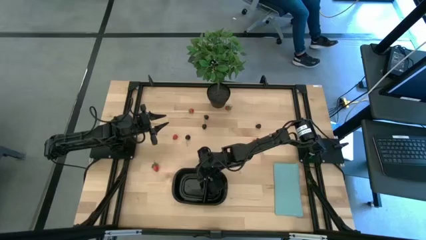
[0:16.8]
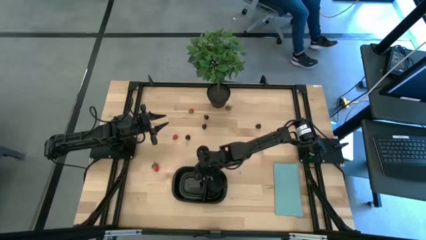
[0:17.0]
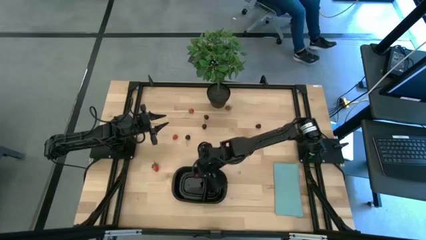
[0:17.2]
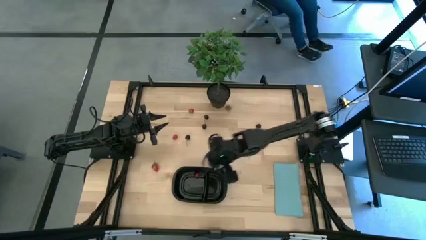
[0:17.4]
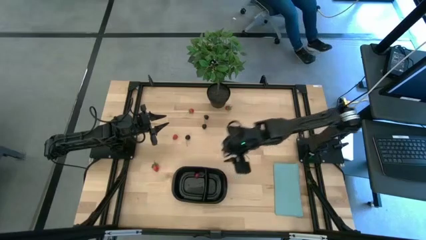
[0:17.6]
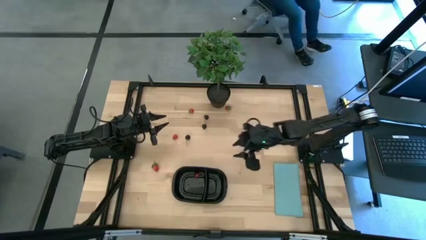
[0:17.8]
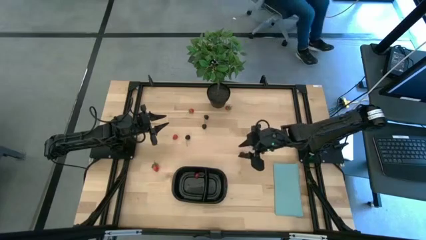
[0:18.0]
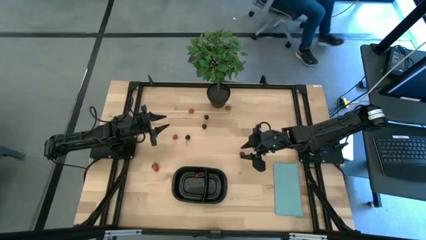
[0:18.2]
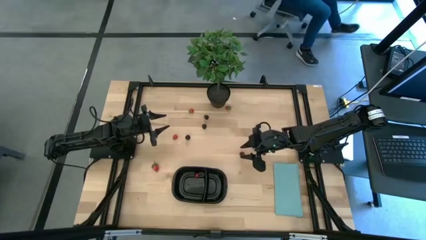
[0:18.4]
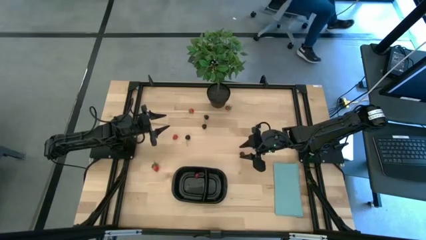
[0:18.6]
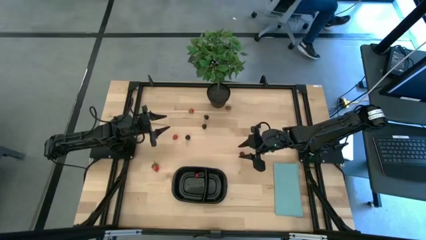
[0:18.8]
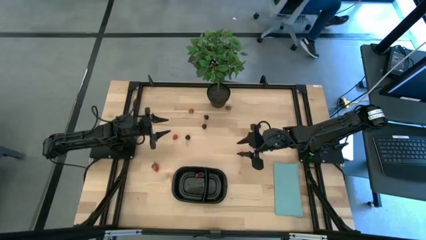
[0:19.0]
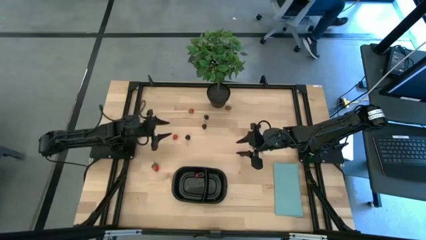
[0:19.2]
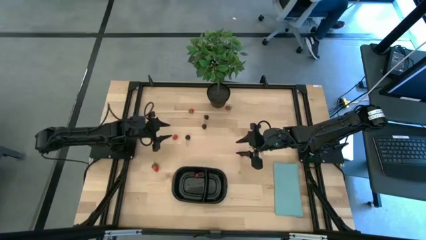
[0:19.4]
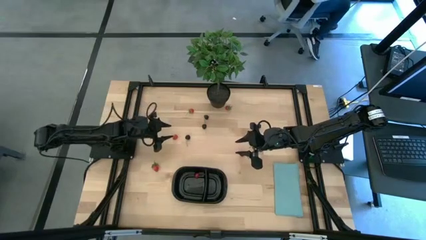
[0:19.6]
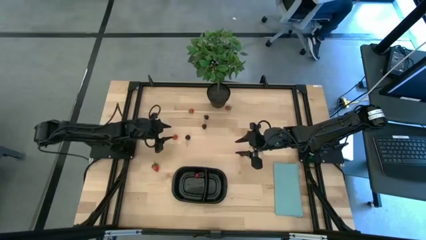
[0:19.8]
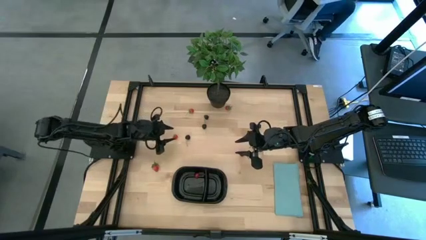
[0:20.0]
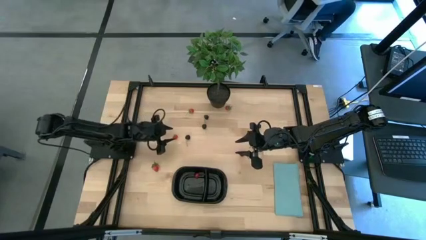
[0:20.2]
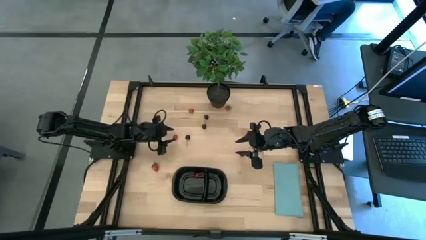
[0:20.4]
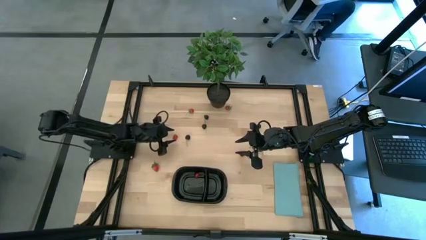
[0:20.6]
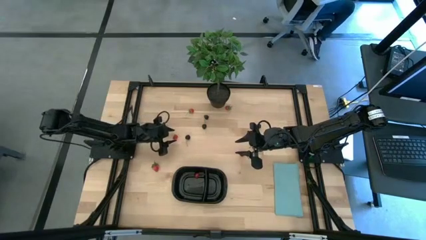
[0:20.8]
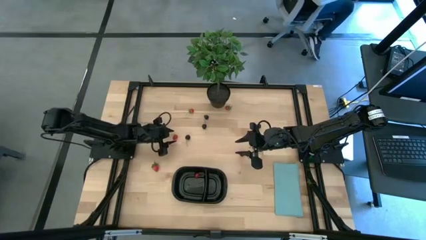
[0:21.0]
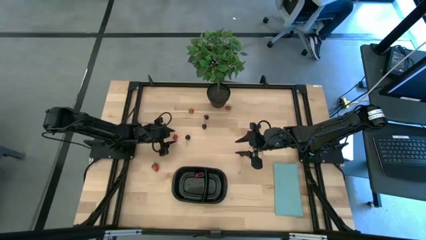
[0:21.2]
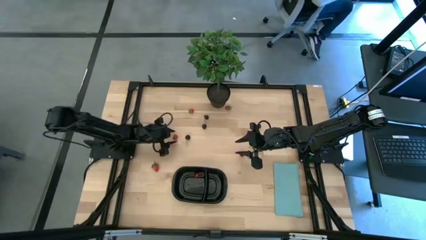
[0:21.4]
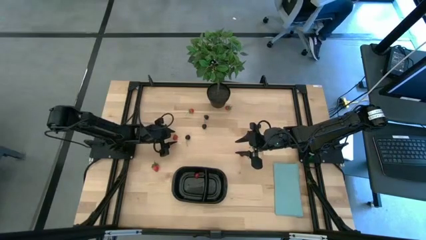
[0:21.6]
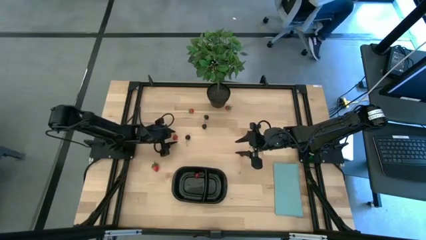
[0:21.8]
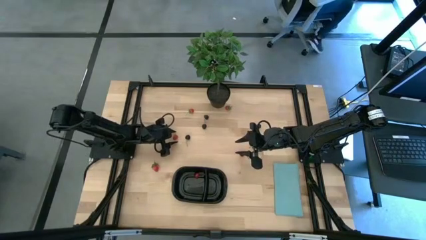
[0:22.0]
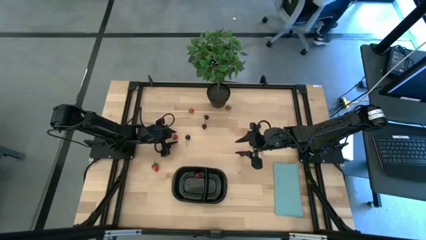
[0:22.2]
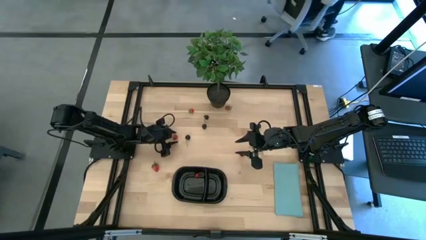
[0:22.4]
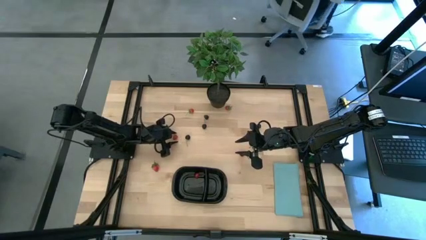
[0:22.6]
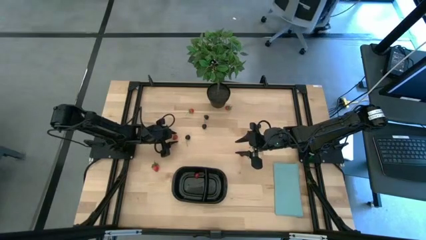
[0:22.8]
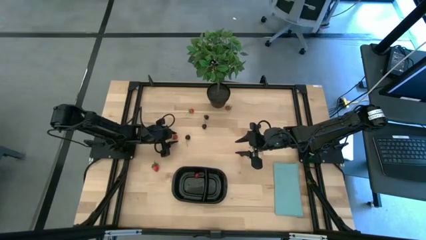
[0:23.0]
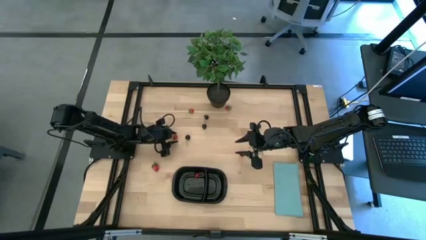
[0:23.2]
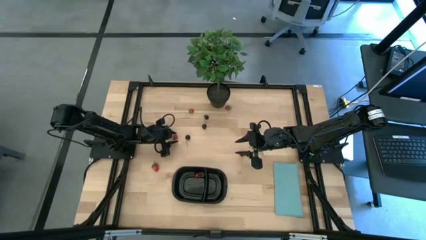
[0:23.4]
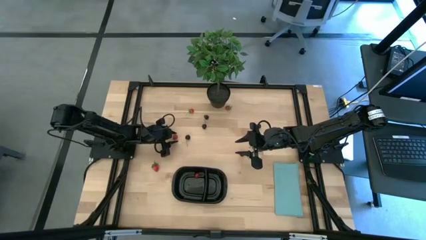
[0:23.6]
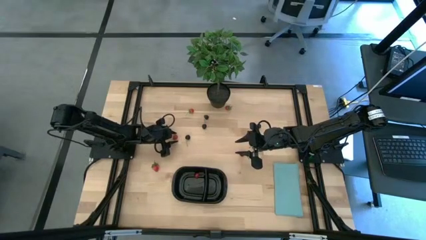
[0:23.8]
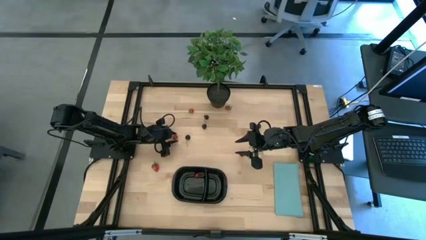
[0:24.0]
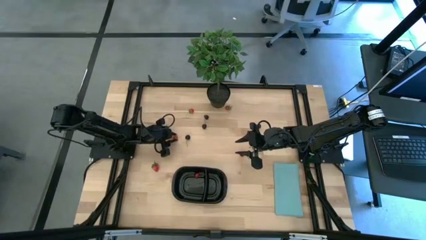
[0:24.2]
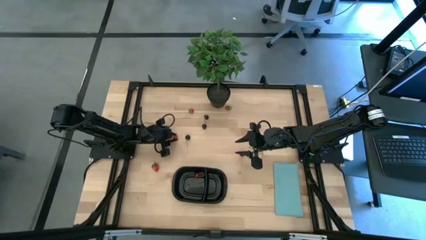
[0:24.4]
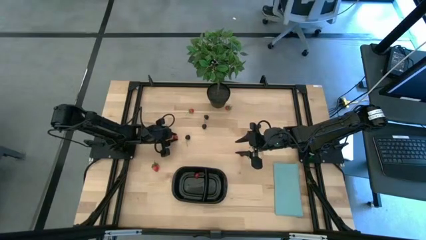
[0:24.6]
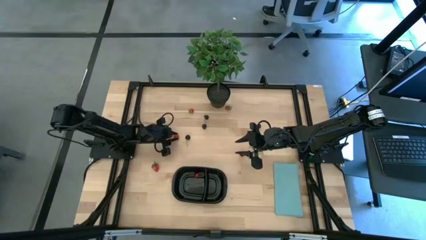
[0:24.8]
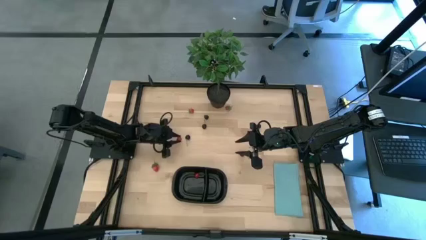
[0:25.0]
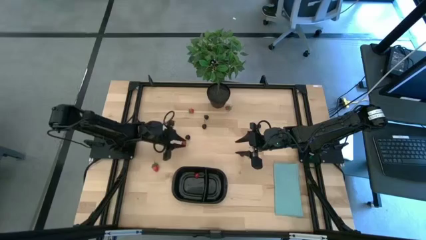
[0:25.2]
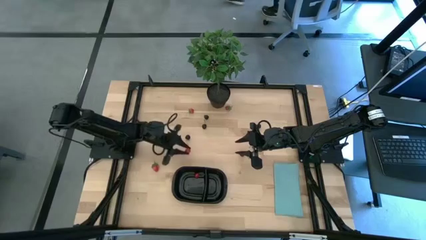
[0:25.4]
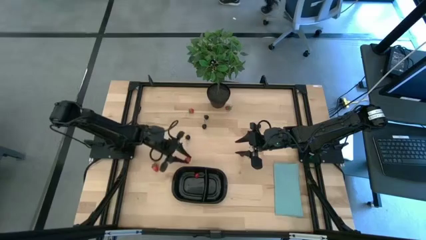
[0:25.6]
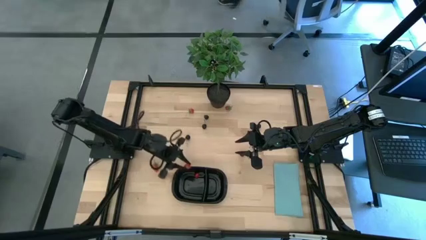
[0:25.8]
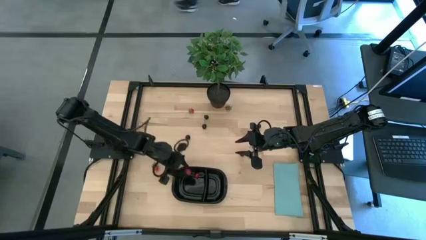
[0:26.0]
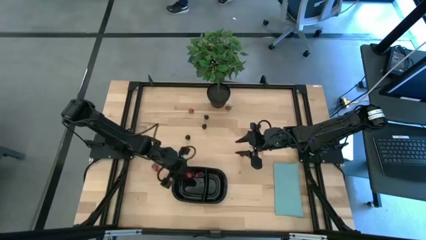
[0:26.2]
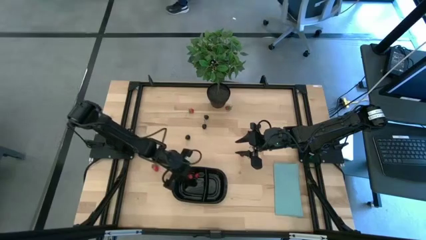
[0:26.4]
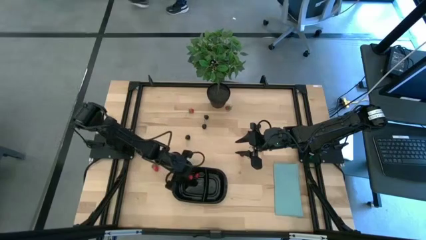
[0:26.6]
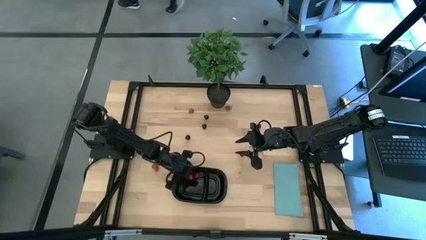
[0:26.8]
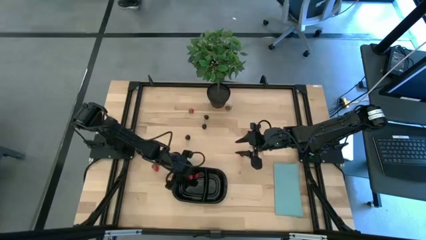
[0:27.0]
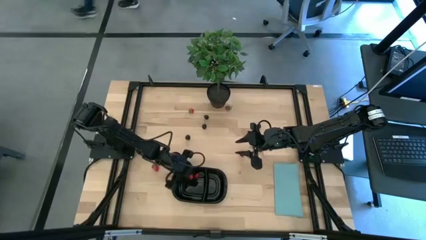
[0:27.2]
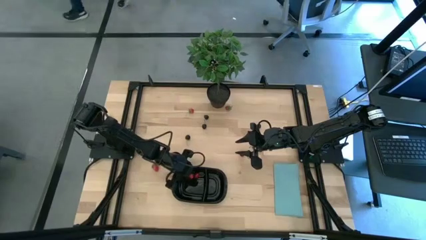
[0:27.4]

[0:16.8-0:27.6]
Task: Pick and placing Produce into tupperware
Put the left red raspberry into the black container with the other red fruit
